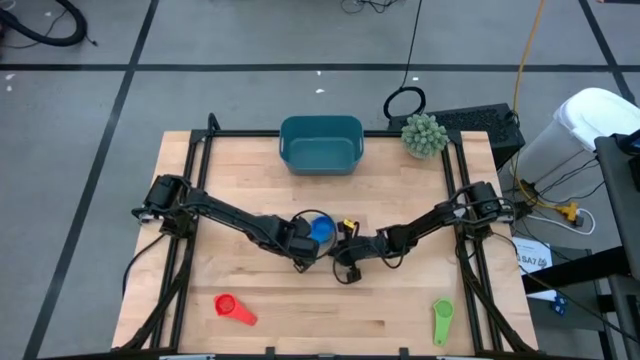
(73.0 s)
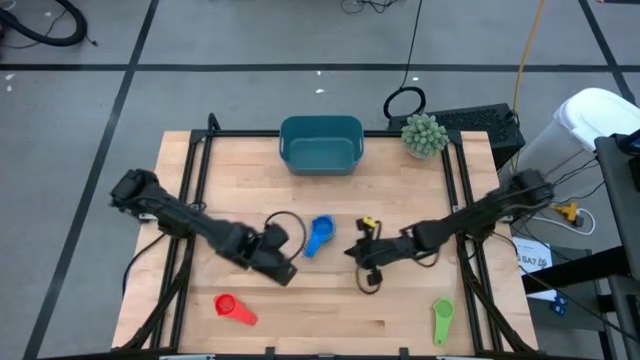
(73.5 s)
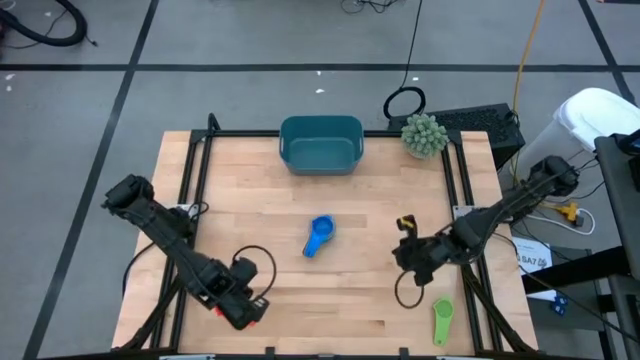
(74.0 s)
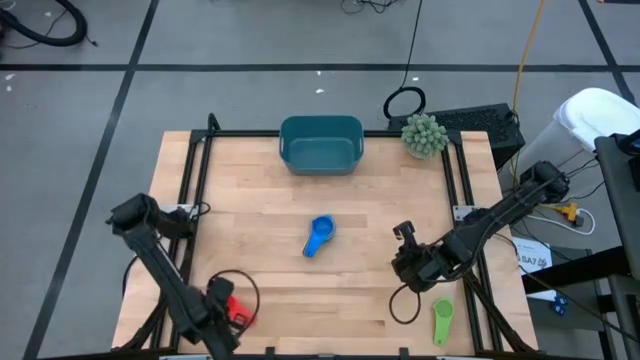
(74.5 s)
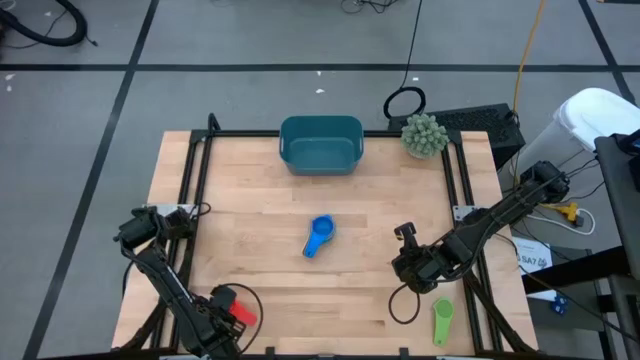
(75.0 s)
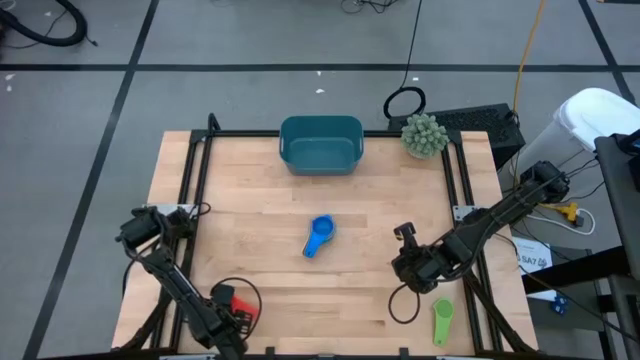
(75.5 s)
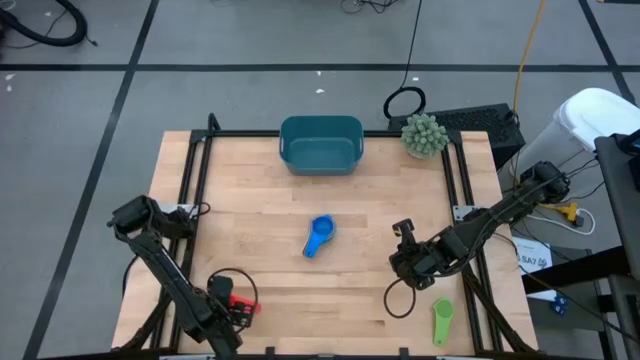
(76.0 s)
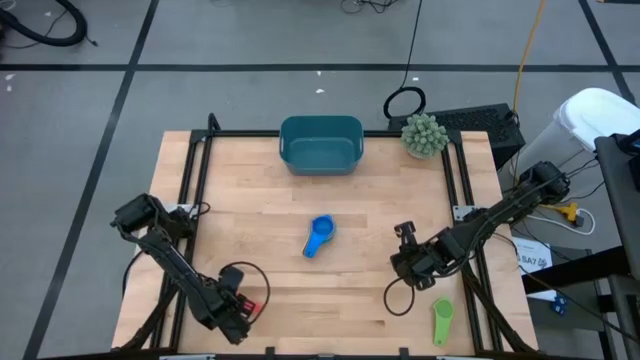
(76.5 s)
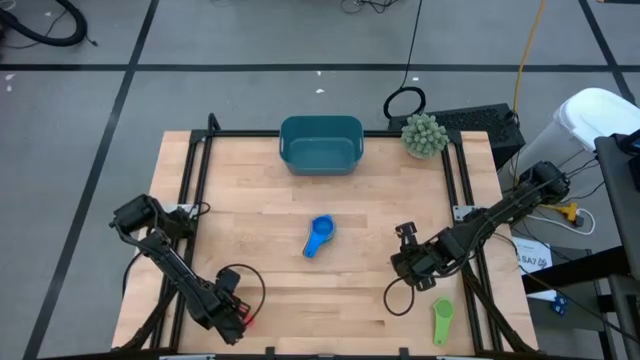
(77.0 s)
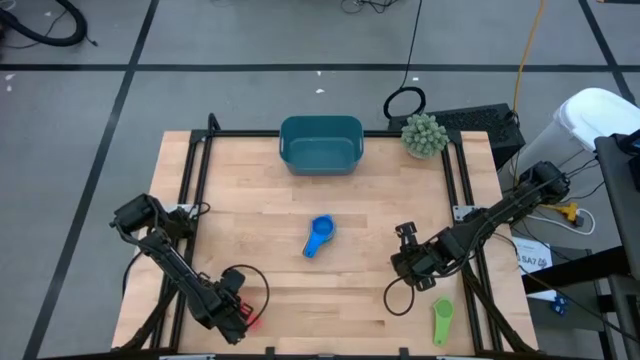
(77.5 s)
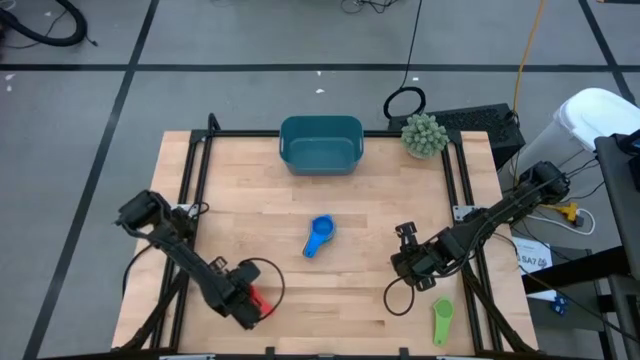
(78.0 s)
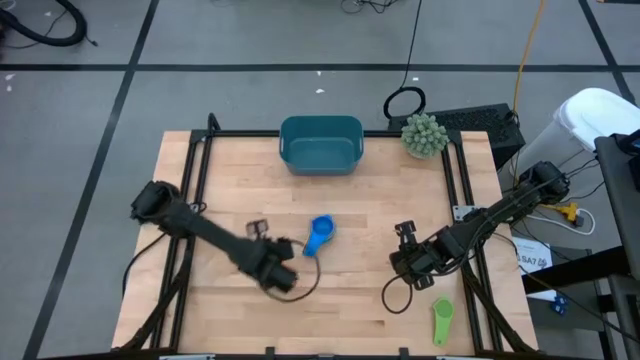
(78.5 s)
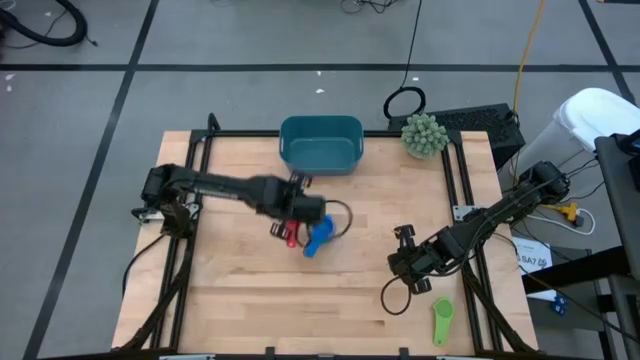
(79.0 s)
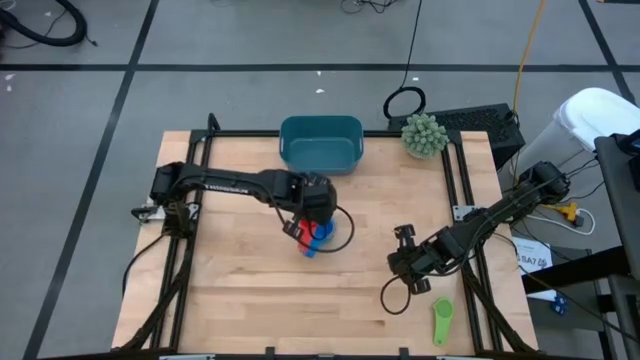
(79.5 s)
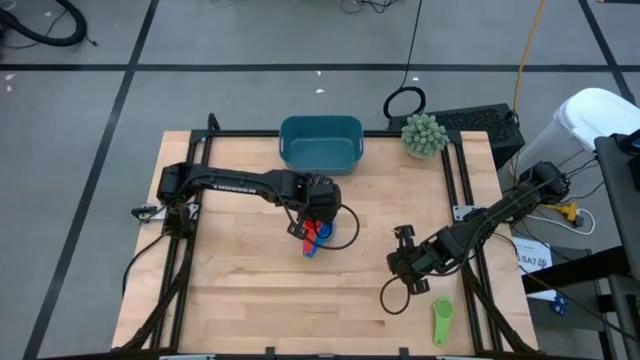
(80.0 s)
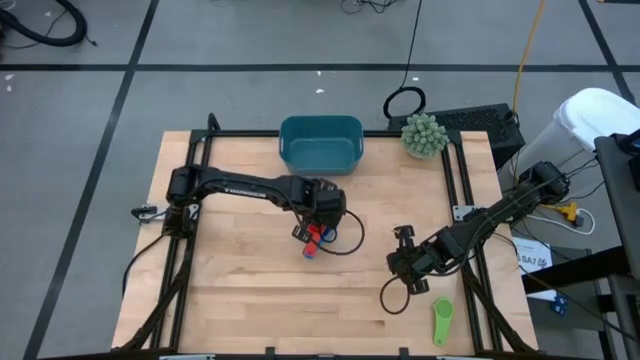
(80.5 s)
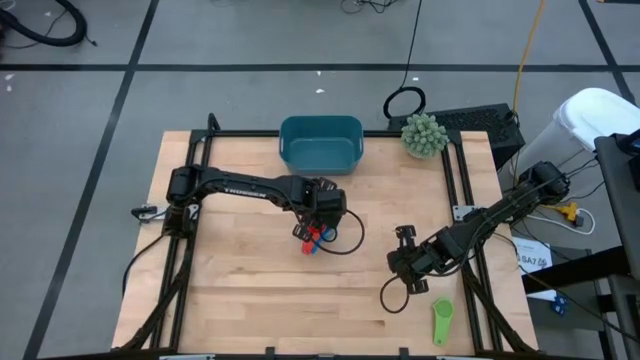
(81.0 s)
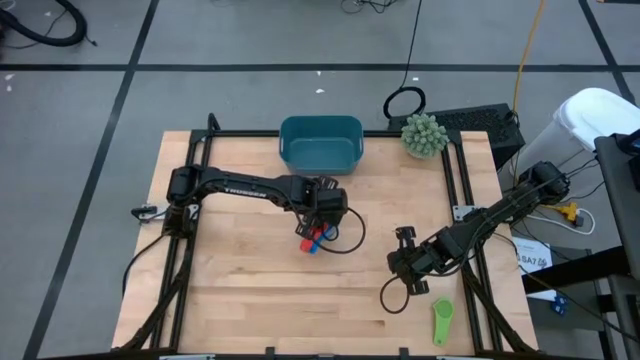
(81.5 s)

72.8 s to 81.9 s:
Task: Nest measuring cups in basket
Stack the red measuring cup on top of the blue measuring cup

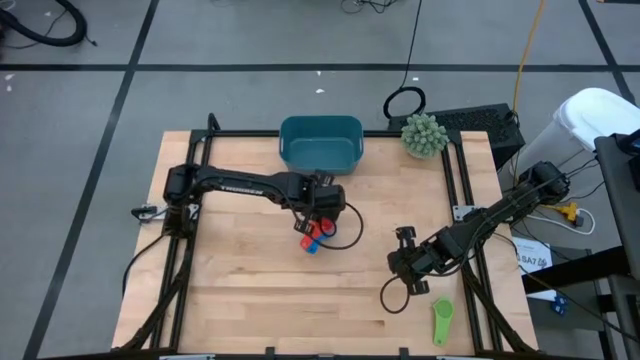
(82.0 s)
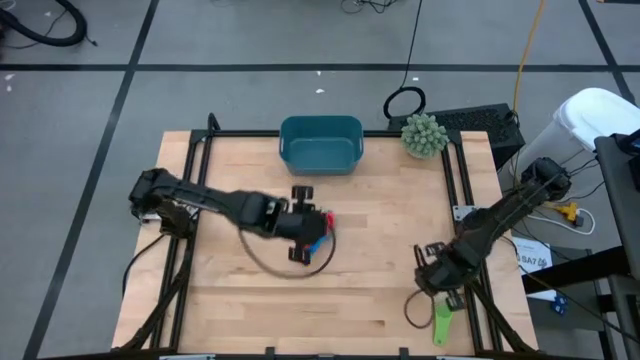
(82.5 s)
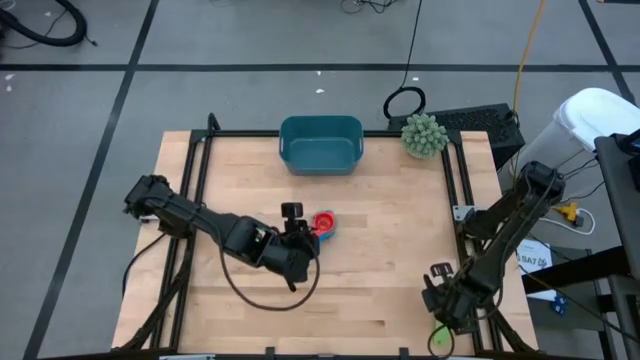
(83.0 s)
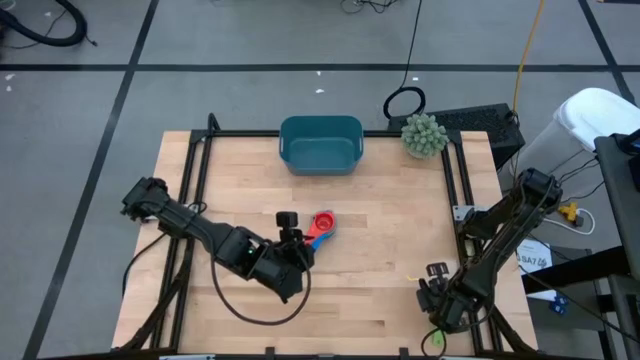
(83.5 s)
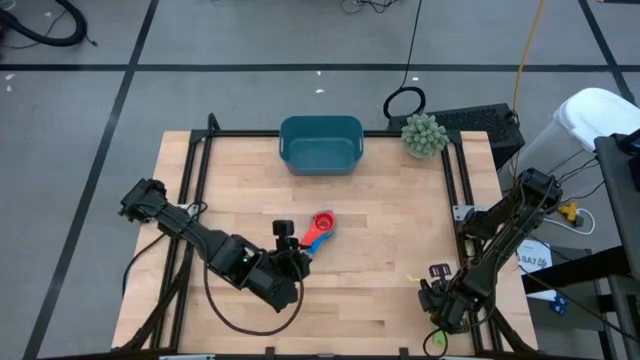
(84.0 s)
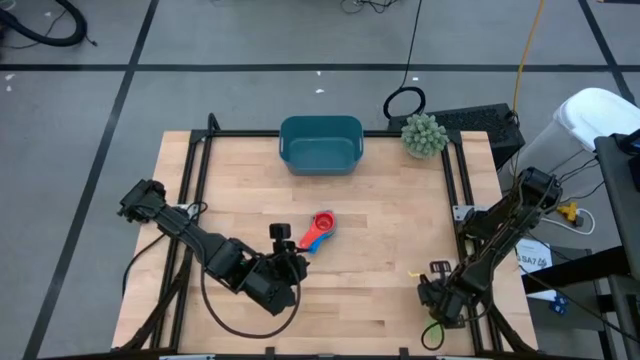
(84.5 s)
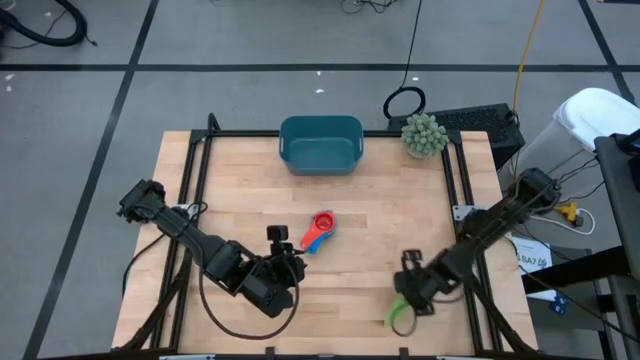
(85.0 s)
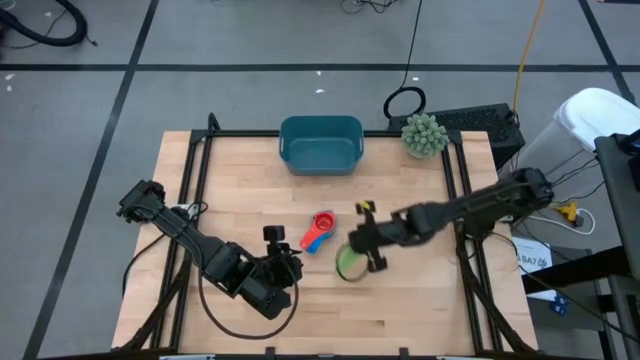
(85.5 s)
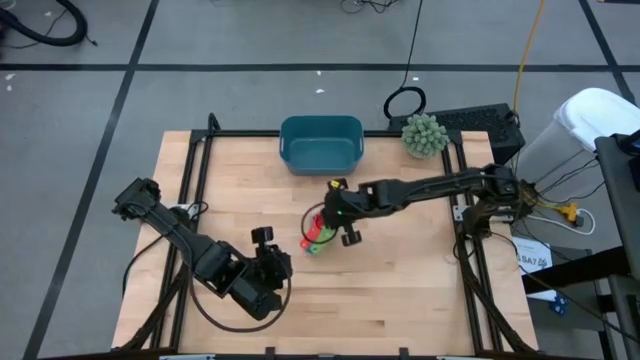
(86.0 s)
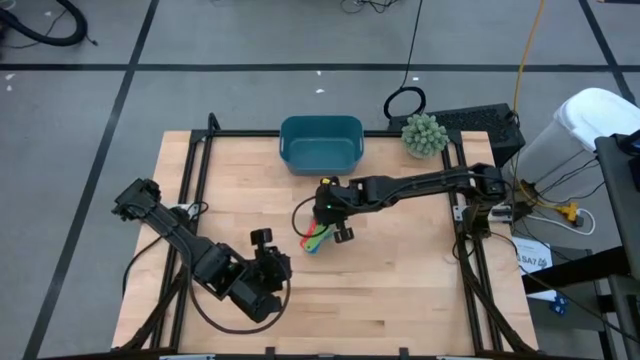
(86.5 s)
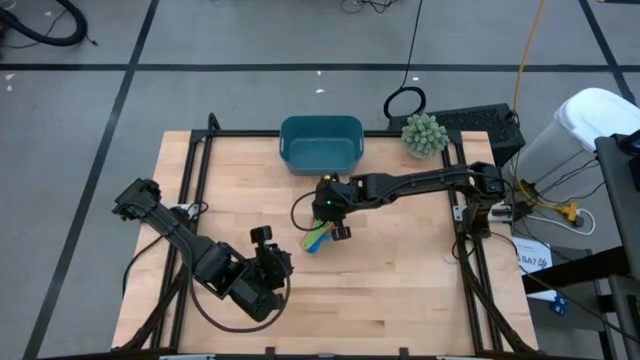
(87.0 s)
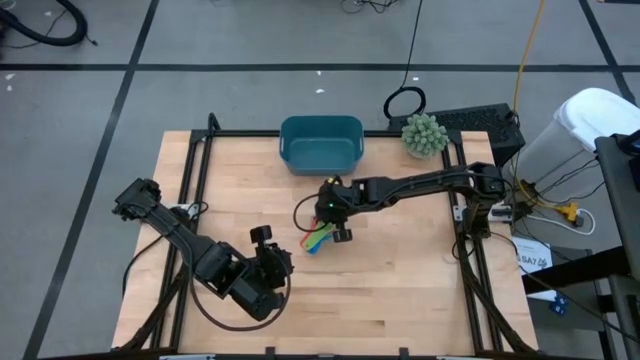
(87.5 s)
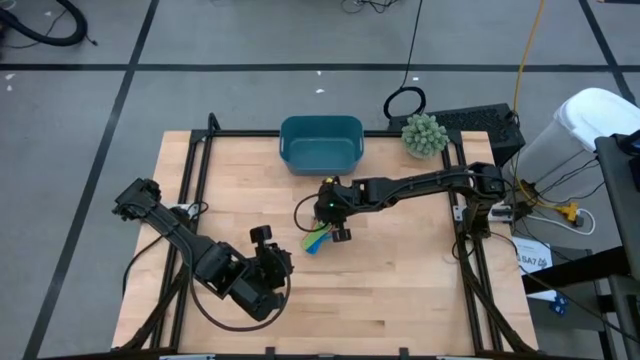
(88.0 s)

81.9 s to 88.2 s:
Stack the green measuring cup on top of the red measuring cup

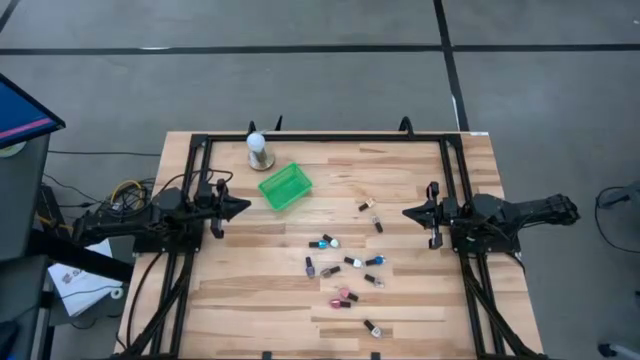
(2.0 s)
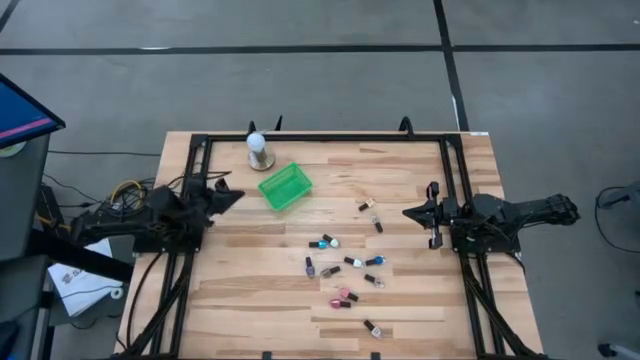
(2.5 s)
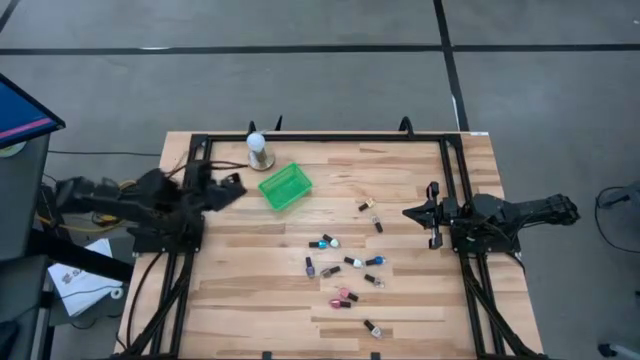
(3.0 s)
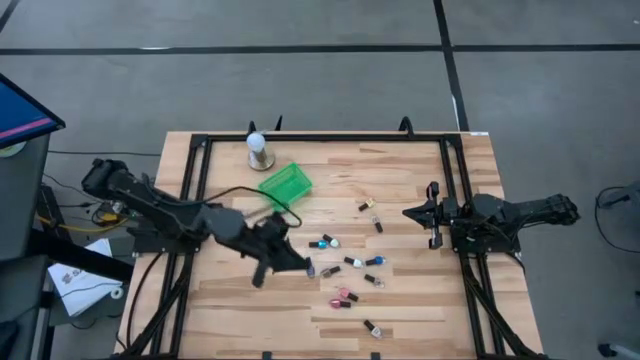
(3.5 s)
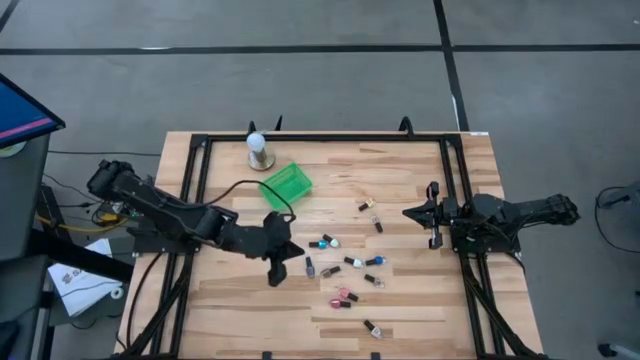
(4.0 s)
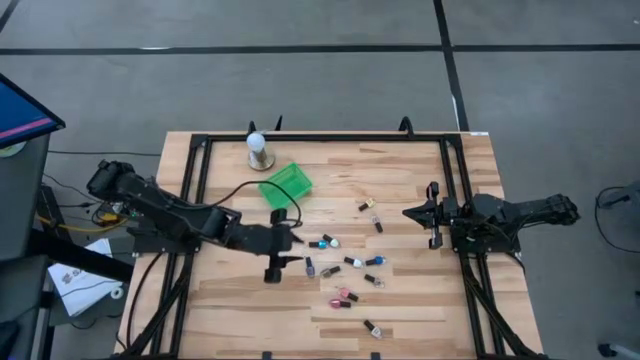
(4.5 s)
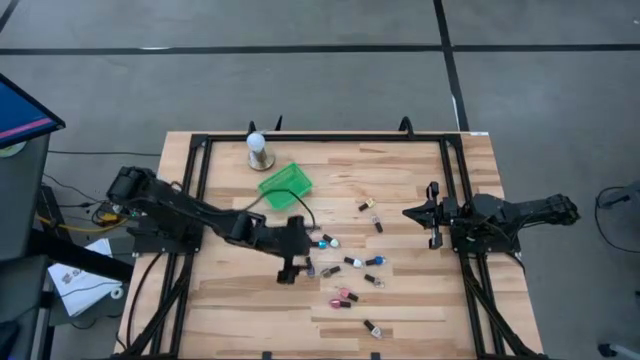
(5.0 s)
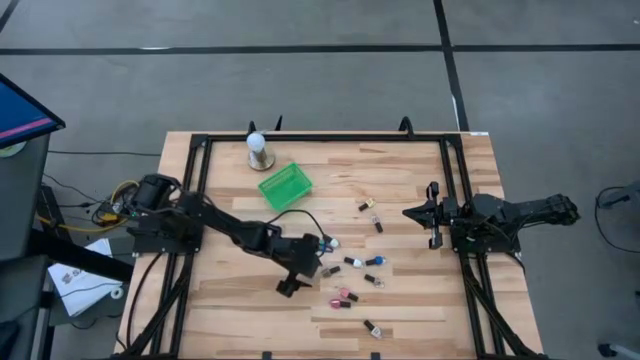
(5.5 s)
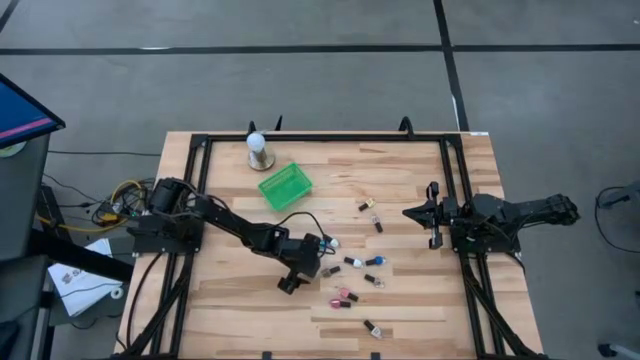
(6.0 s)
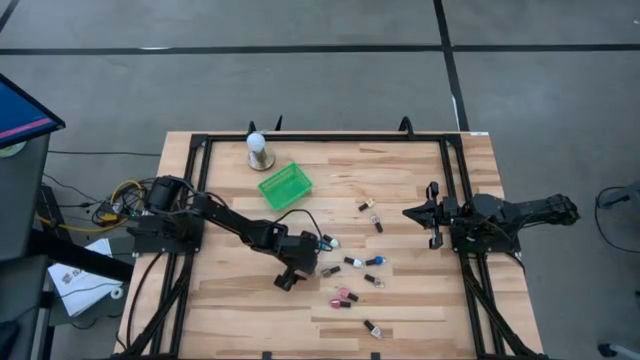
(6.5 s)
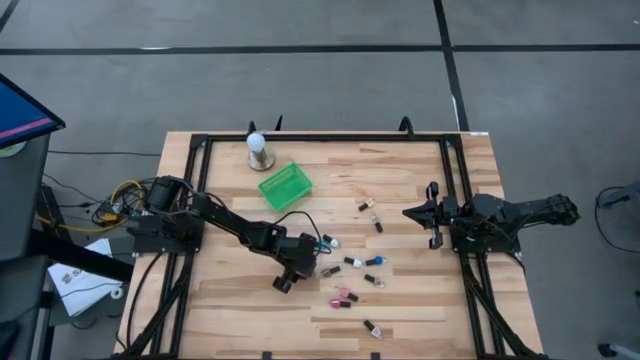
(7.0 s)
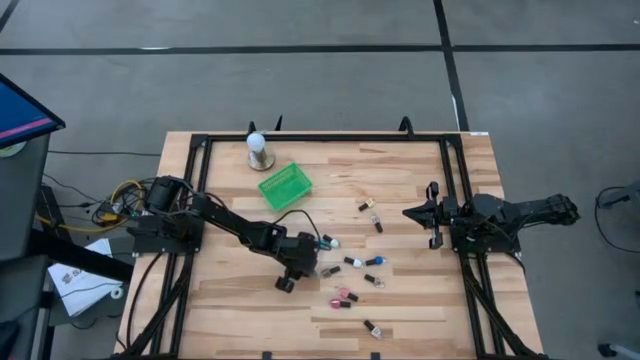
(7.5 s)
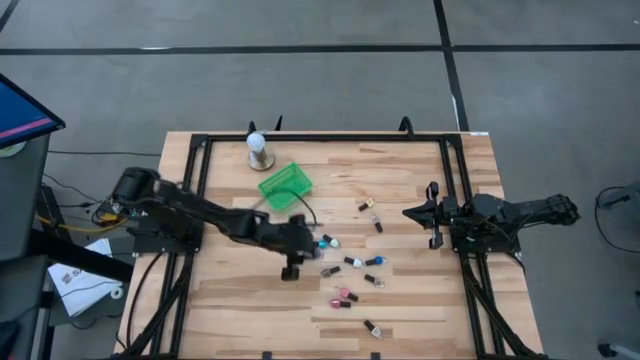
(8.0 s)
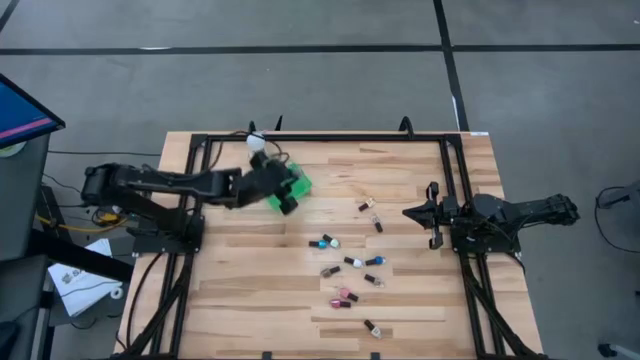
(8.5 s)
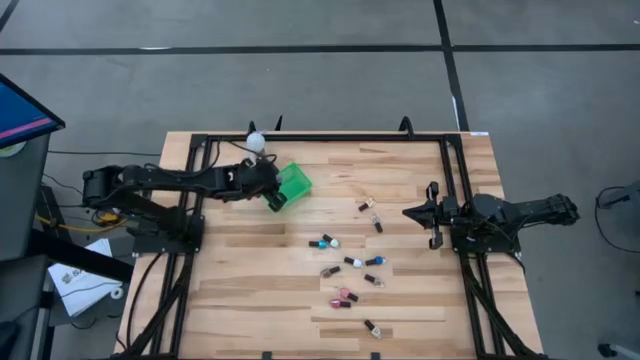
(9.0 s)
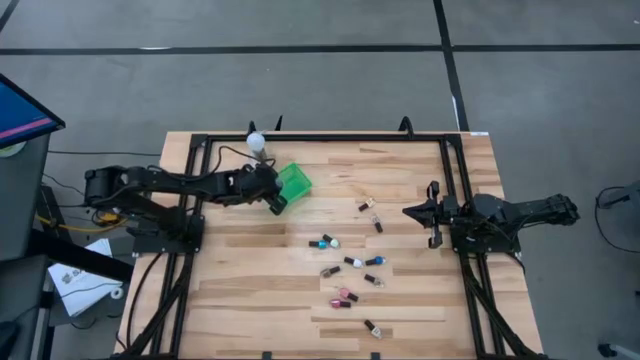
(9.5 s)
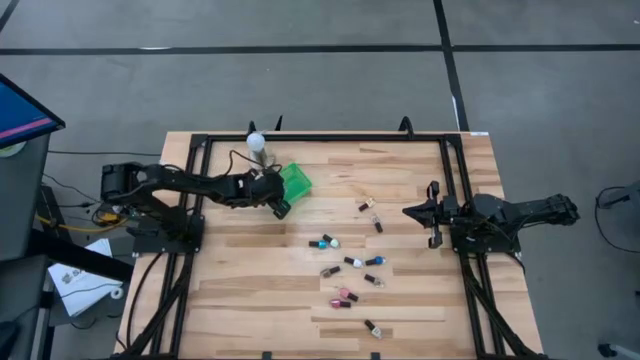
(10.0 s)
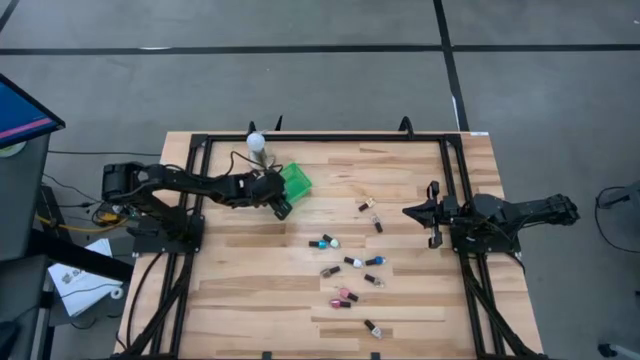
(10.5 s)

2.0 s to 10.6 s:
Task: Pick & Place Nail Polish
Put the violet nail polish bottle into the green bin
